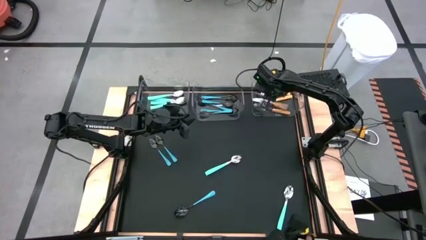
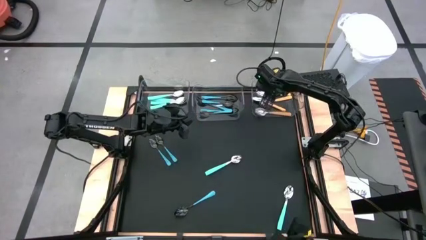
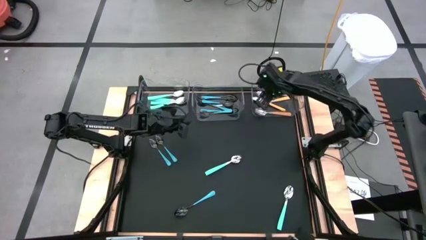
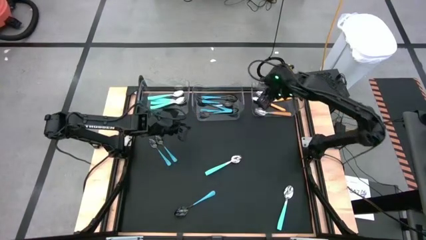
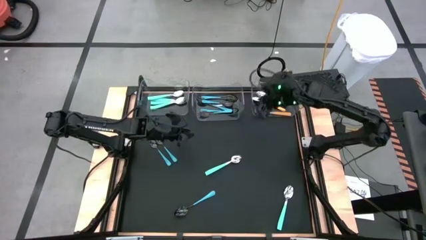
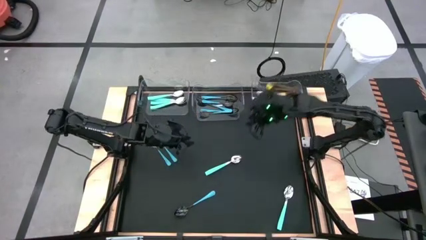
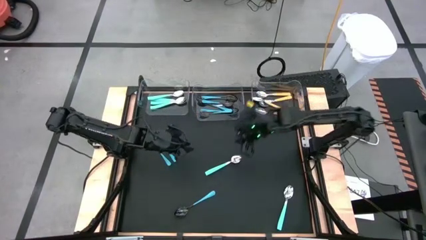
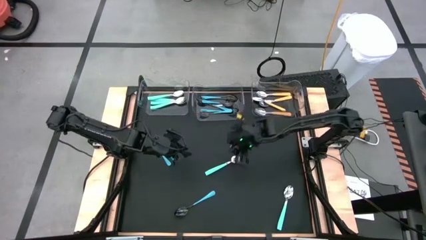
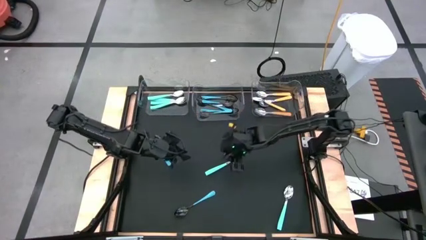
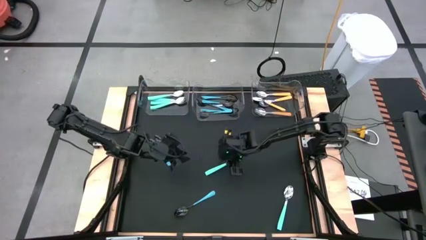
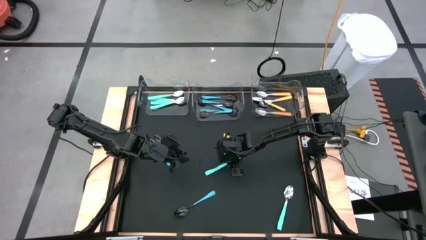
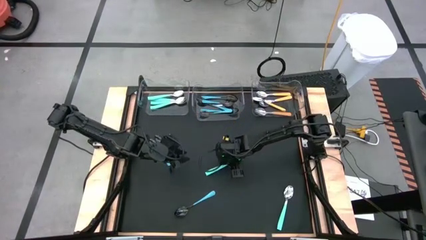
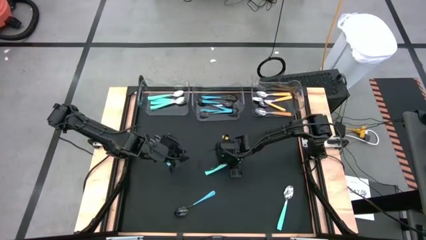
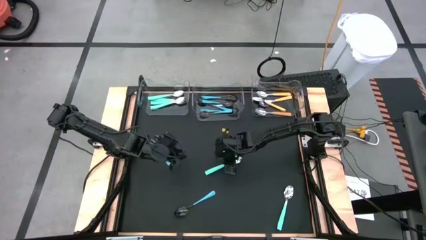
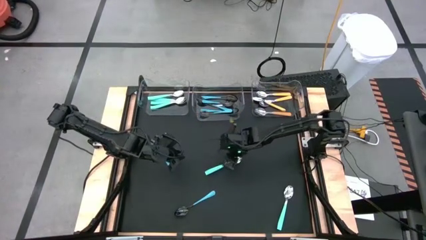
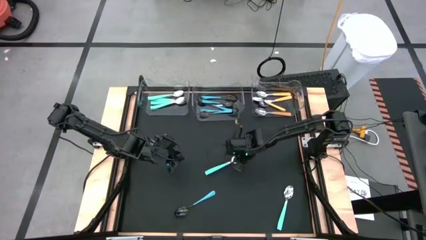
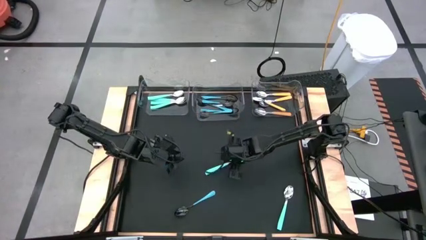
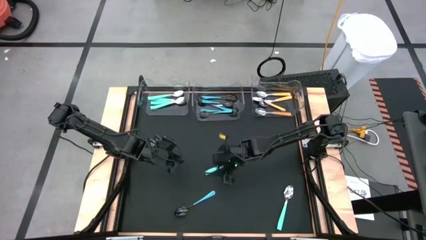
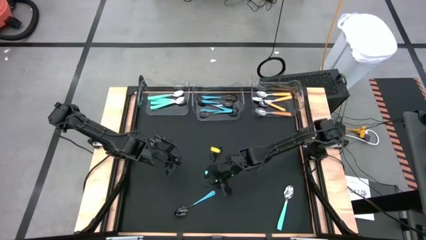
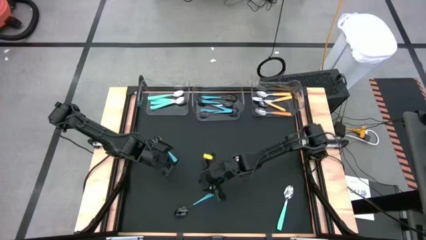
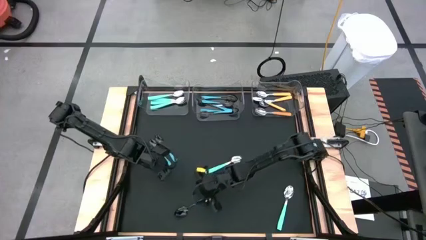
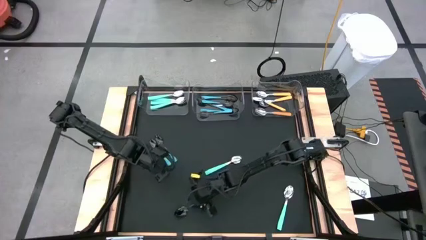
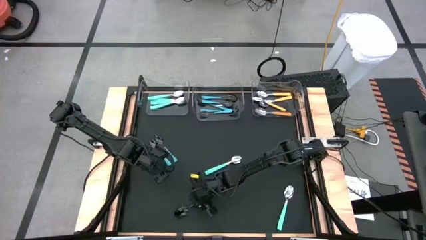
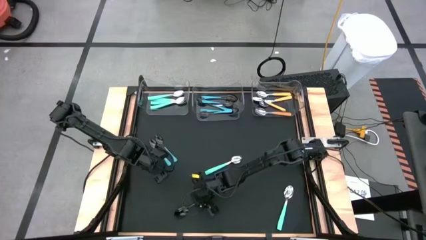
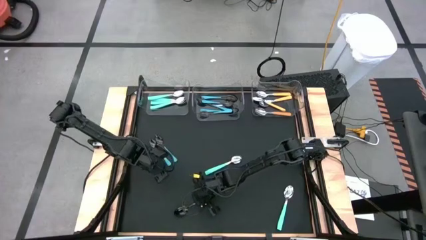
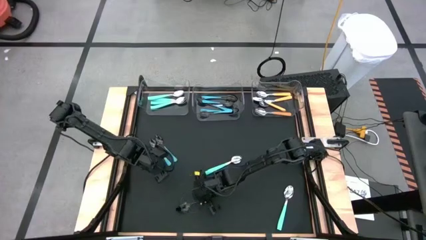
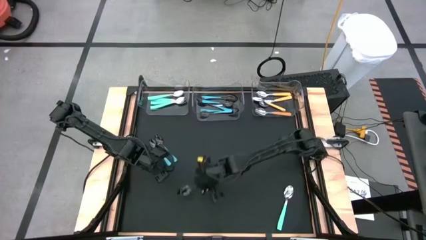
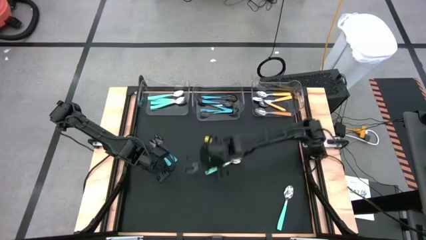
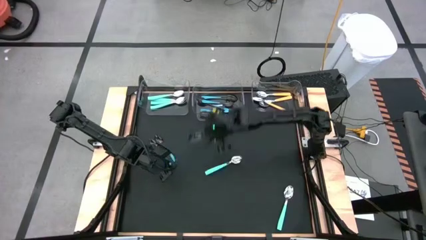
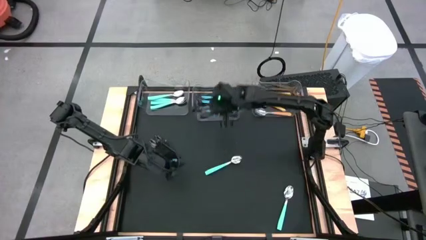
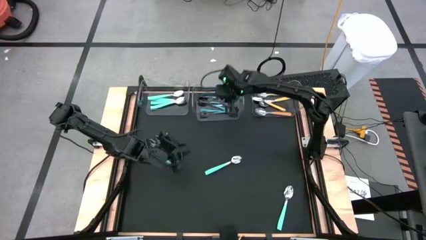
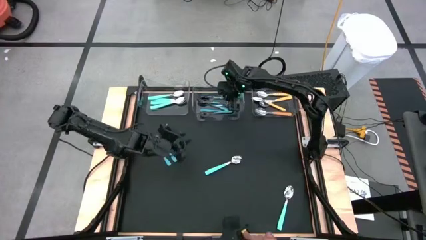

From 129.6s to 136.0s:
Task: Sort silverware by color (type)
Put the blue spoon into the middle transparent bin

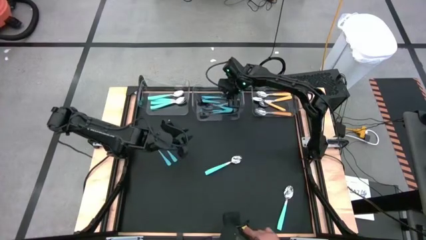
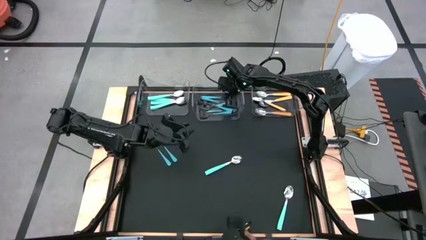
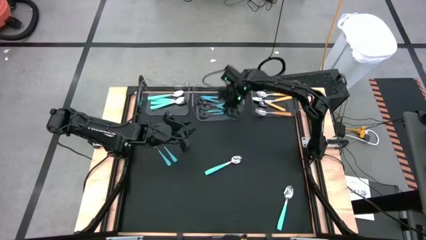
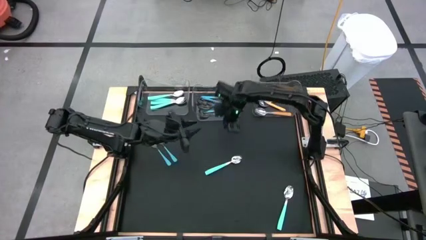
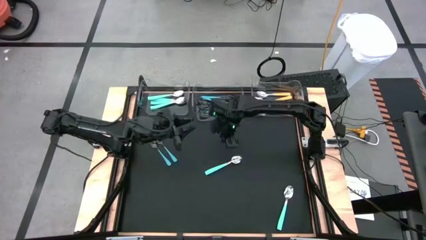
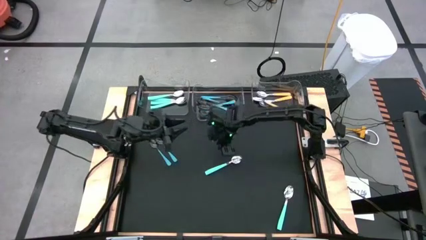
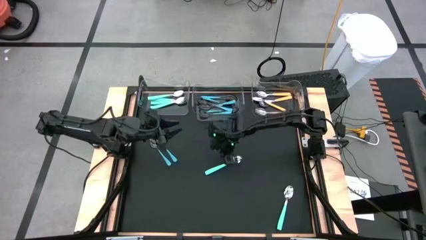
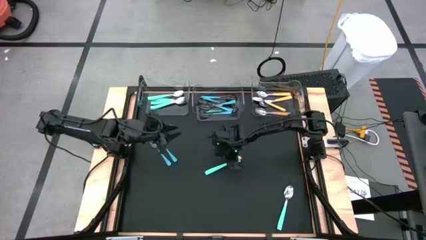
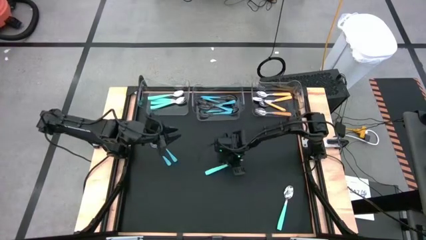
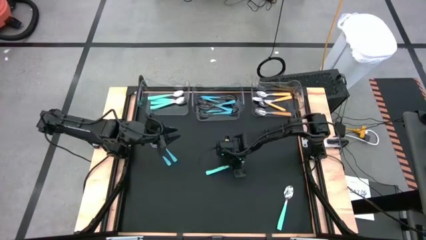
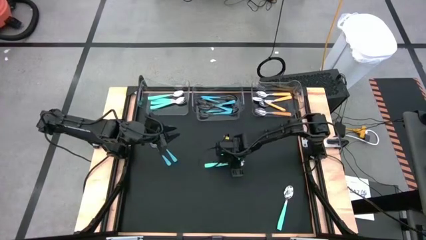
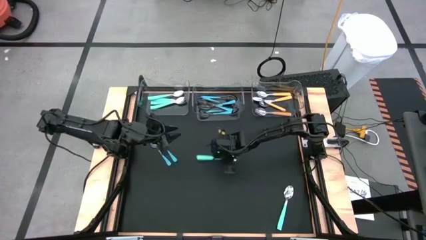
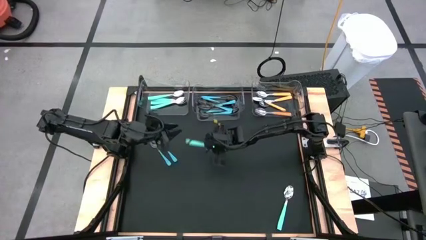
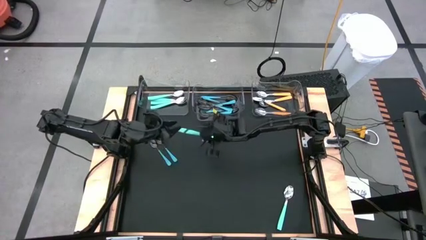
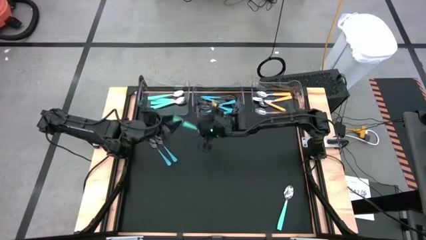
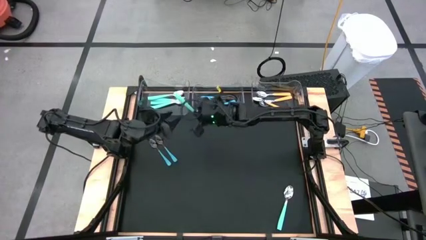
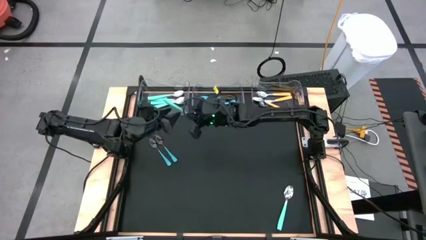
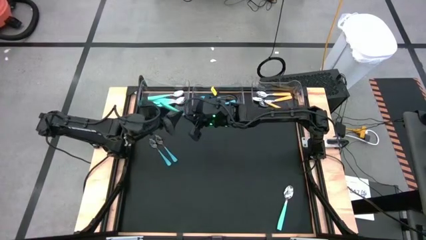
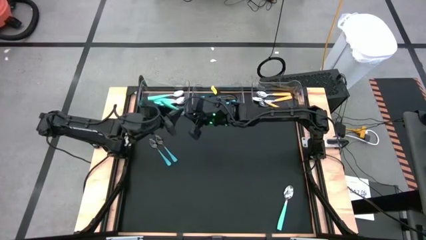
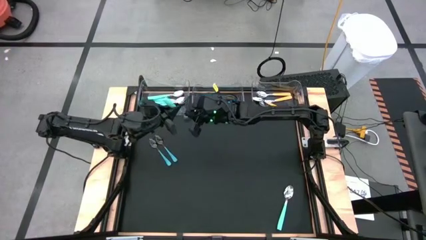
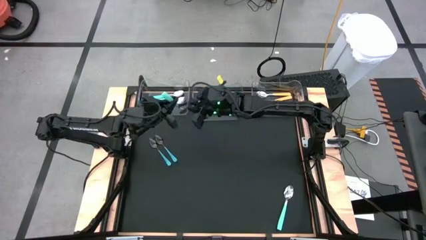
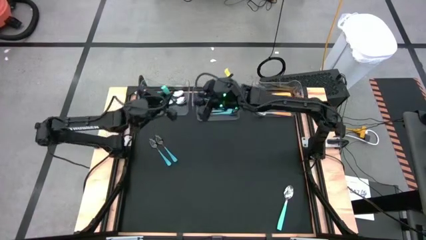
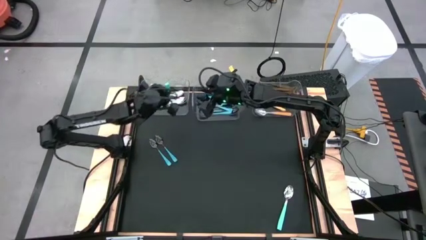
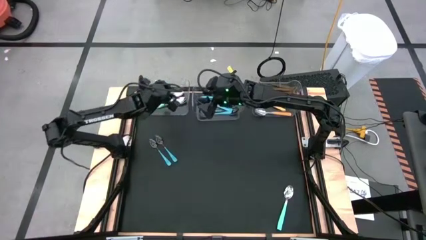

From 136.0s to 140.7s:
Put the light blue spoon into the left transparent bin

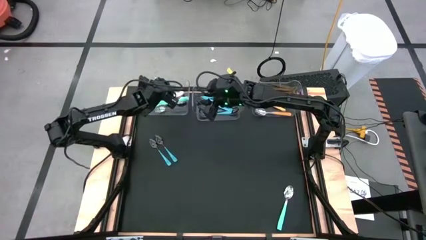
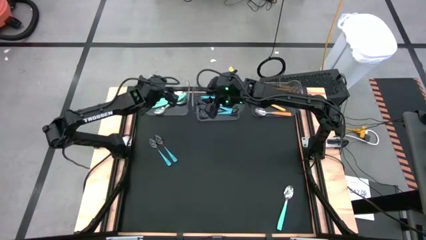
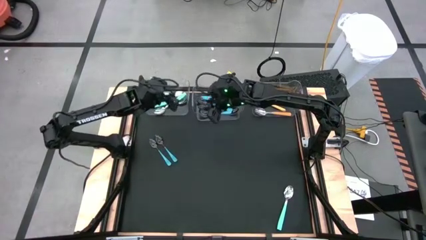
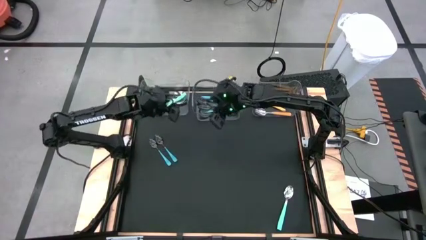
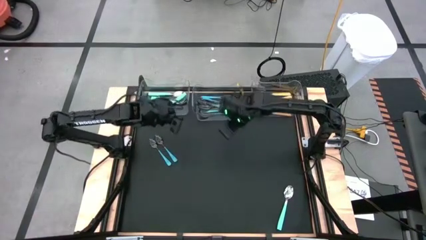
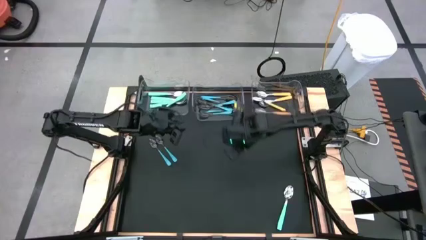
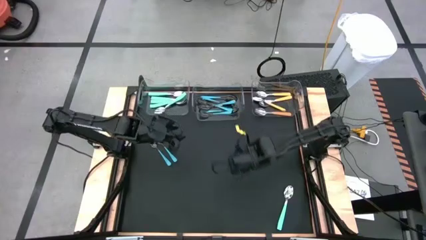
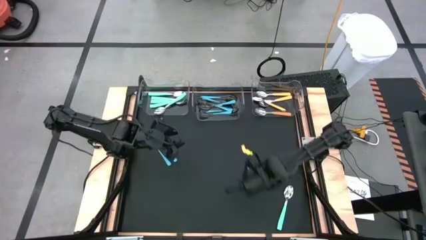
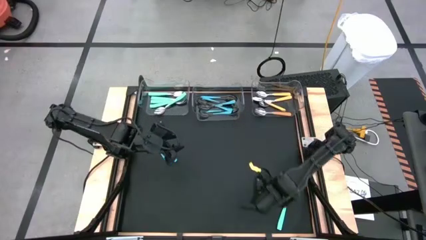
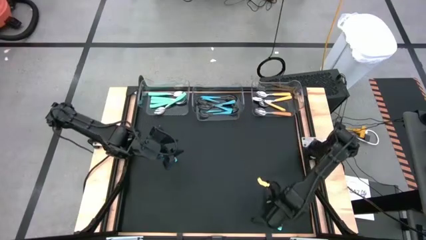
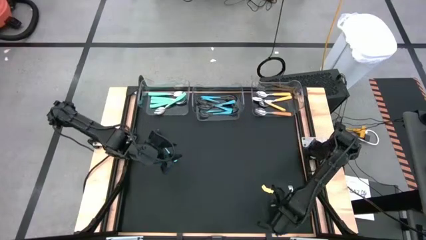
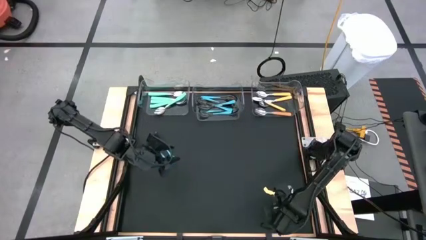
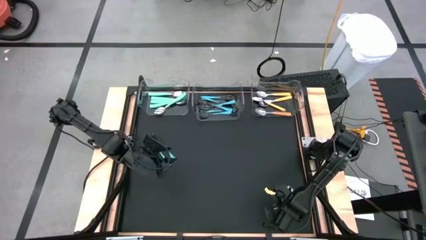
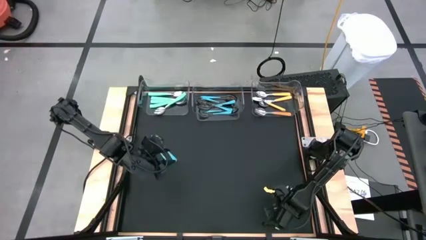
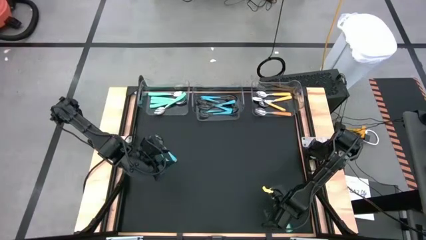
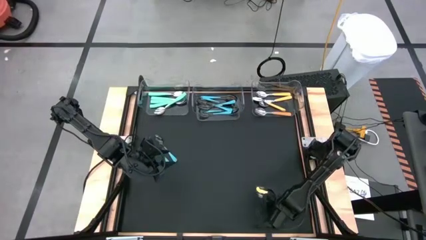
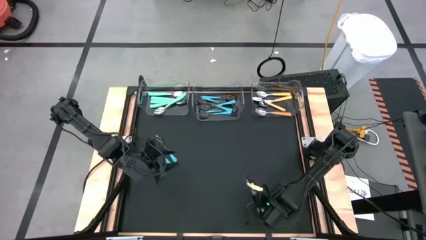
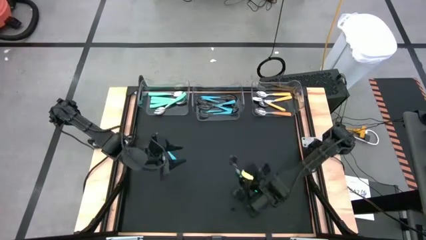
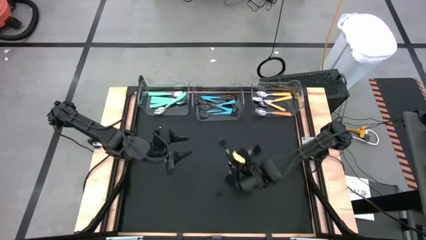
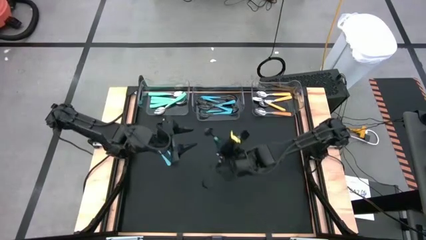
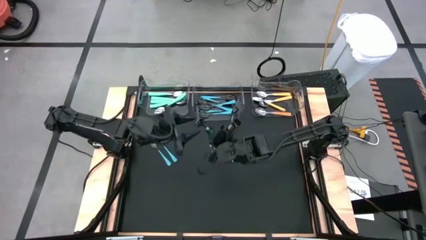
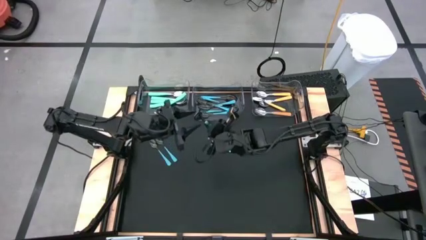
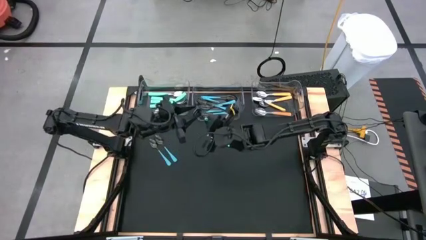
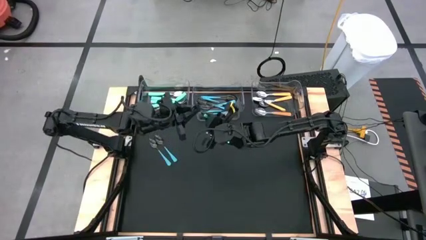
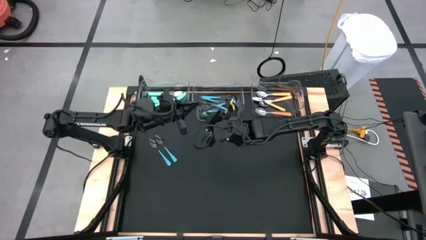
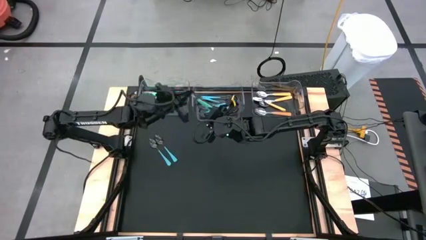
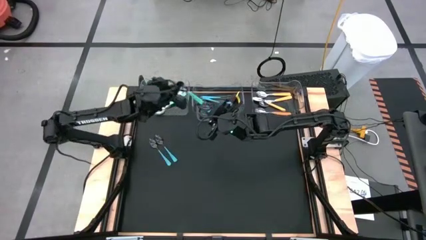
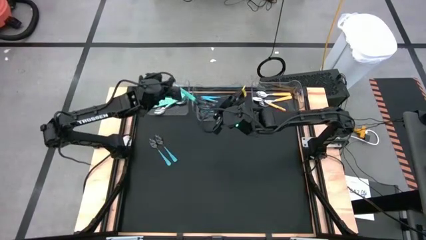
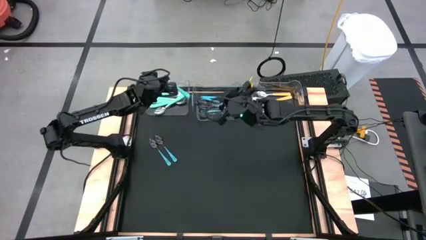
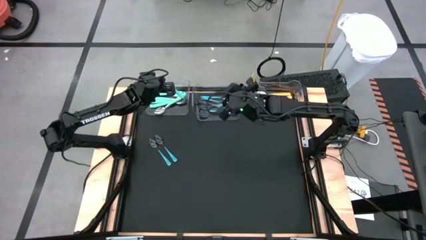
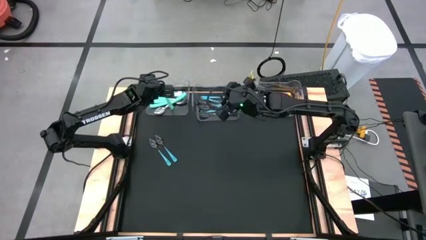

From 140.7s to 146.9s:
Put the light blue spoon into the left transparent bin
